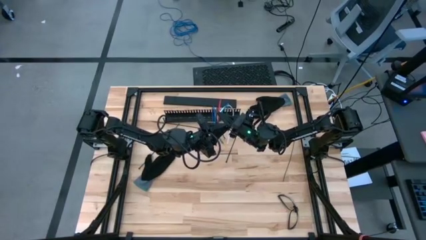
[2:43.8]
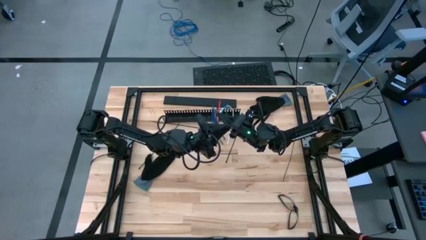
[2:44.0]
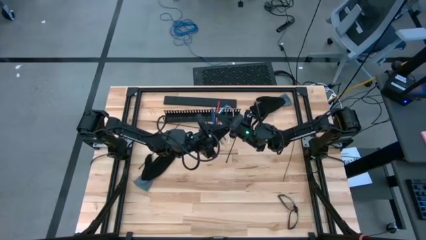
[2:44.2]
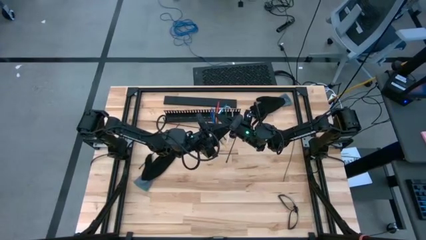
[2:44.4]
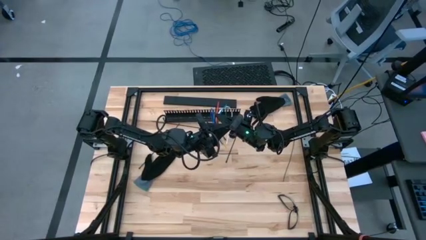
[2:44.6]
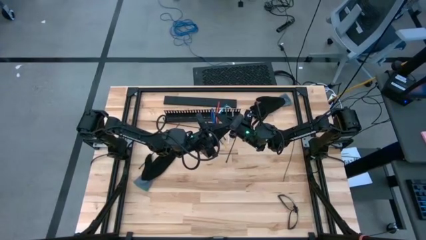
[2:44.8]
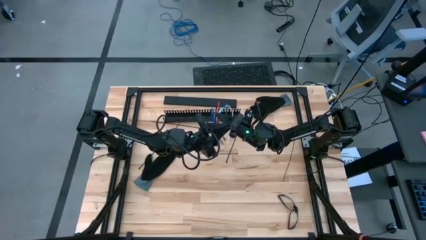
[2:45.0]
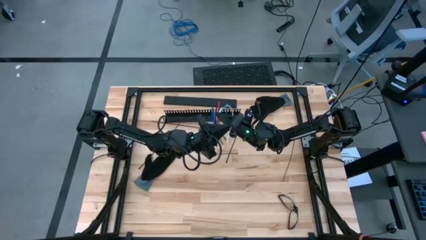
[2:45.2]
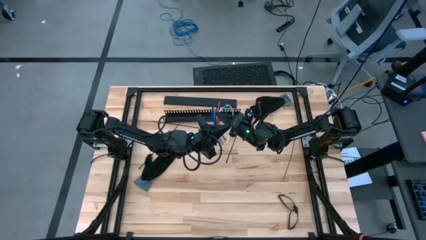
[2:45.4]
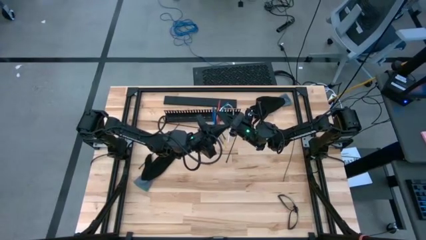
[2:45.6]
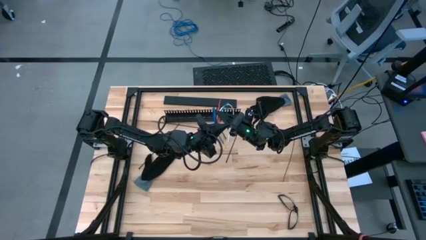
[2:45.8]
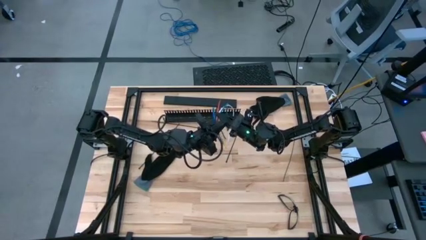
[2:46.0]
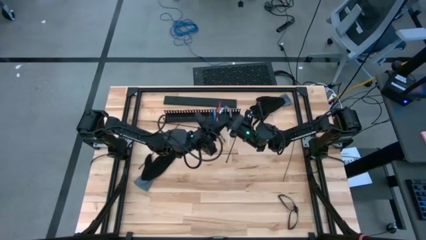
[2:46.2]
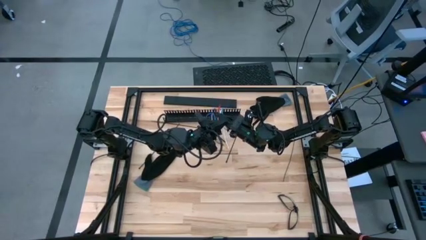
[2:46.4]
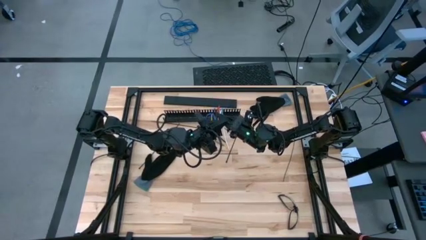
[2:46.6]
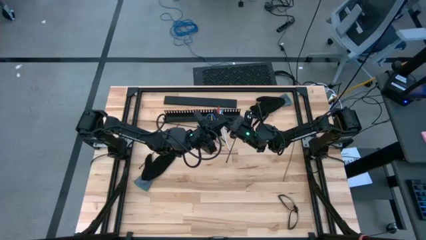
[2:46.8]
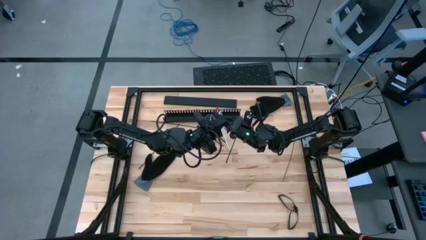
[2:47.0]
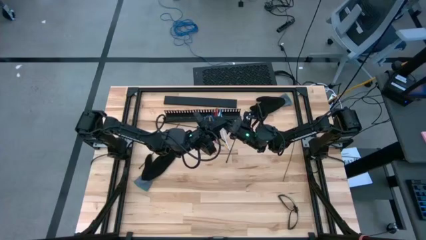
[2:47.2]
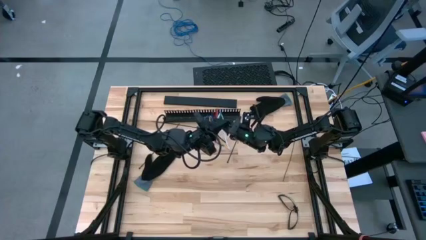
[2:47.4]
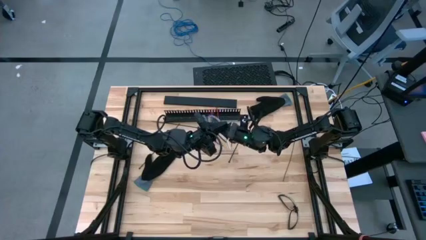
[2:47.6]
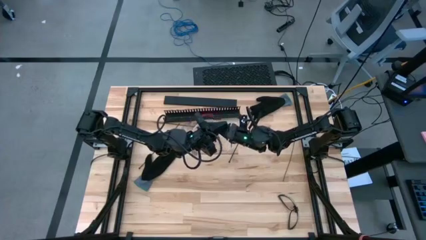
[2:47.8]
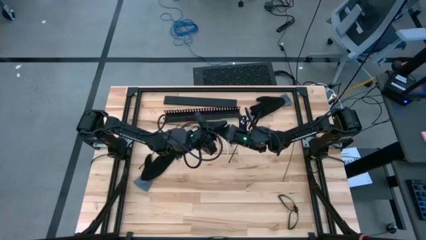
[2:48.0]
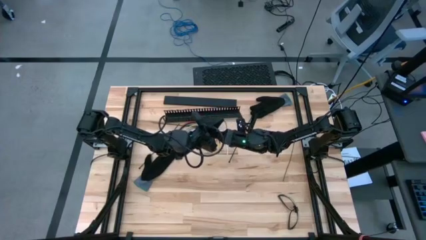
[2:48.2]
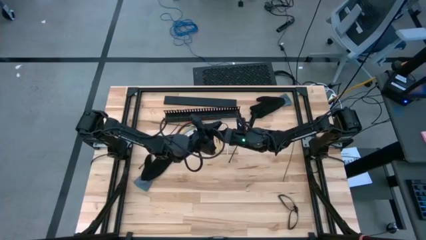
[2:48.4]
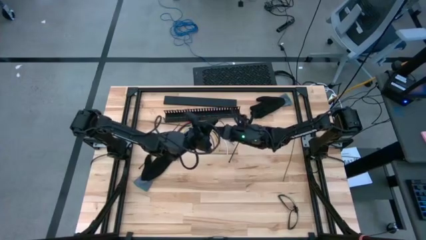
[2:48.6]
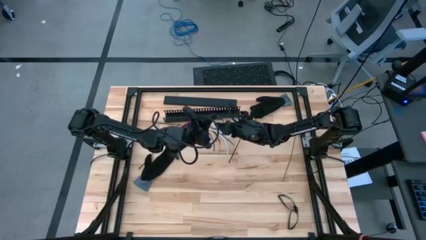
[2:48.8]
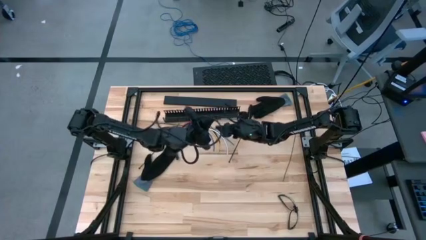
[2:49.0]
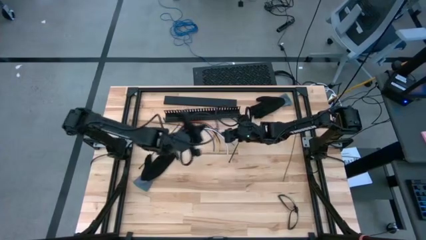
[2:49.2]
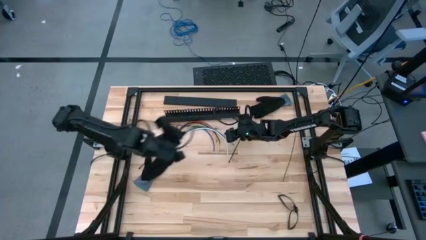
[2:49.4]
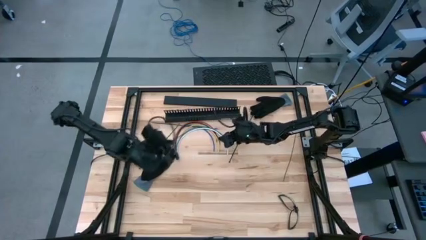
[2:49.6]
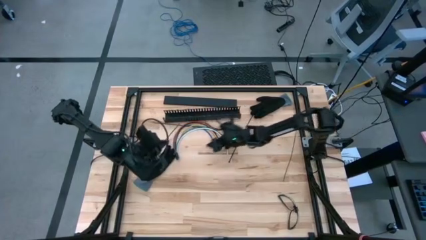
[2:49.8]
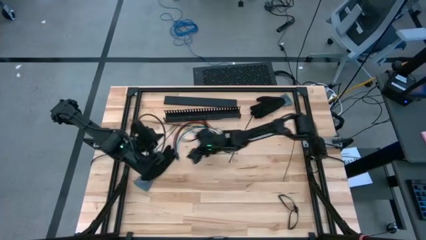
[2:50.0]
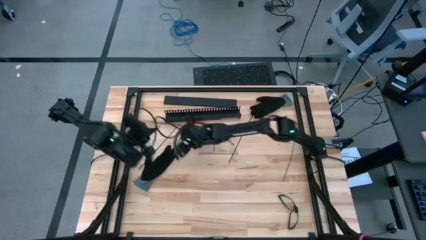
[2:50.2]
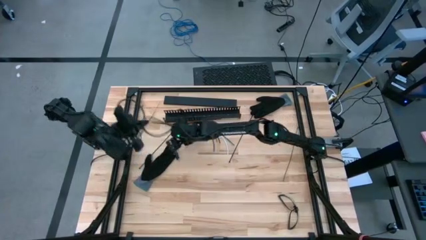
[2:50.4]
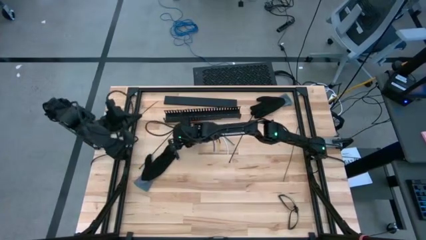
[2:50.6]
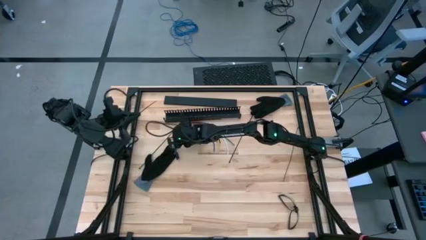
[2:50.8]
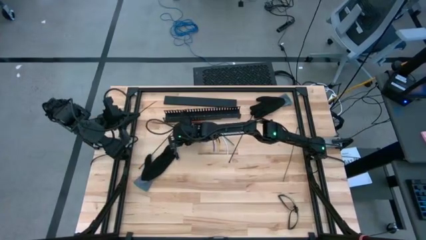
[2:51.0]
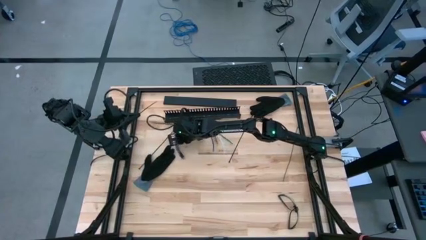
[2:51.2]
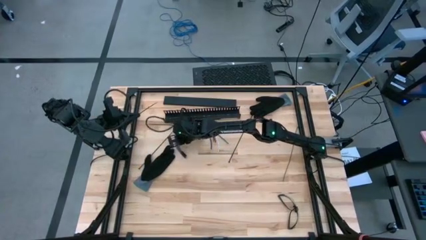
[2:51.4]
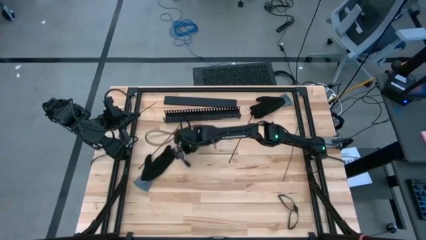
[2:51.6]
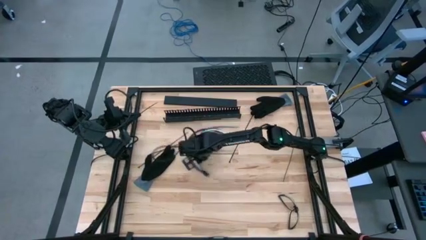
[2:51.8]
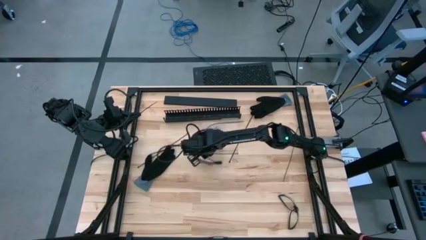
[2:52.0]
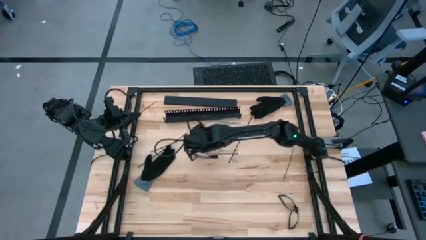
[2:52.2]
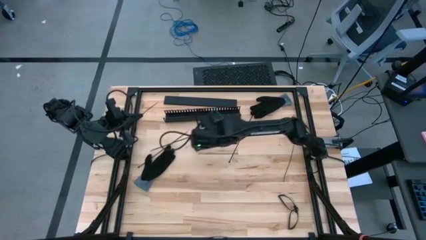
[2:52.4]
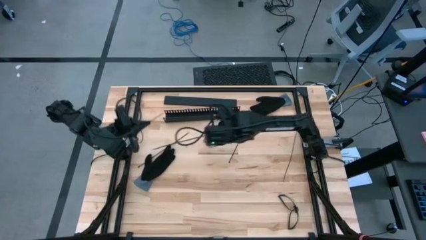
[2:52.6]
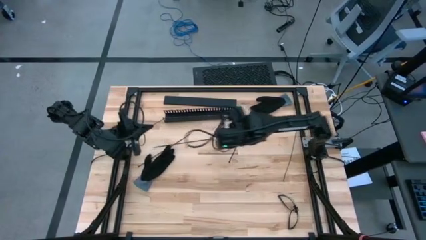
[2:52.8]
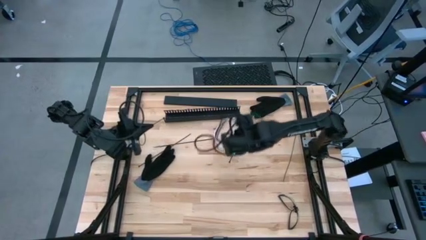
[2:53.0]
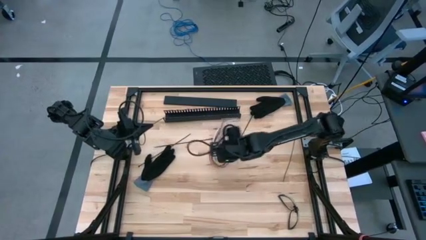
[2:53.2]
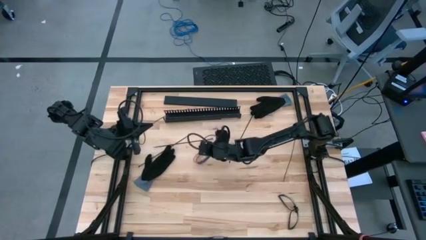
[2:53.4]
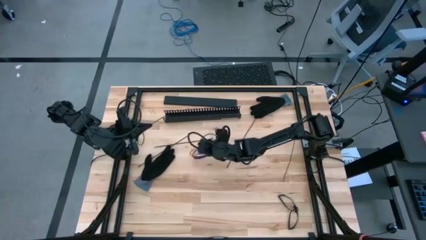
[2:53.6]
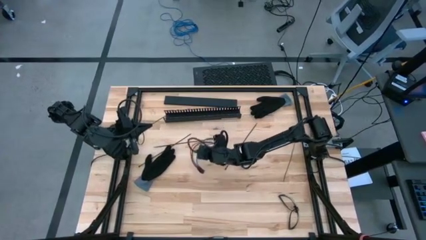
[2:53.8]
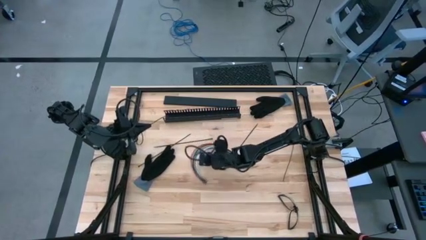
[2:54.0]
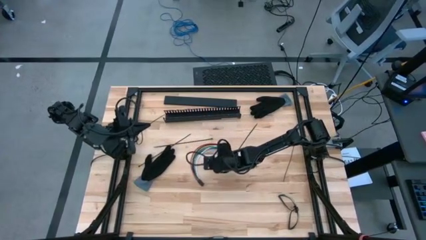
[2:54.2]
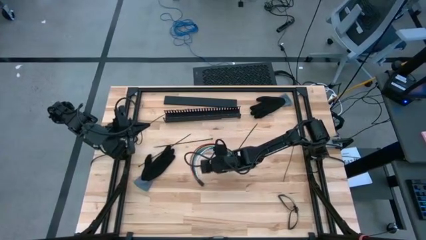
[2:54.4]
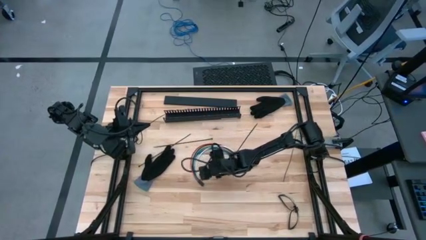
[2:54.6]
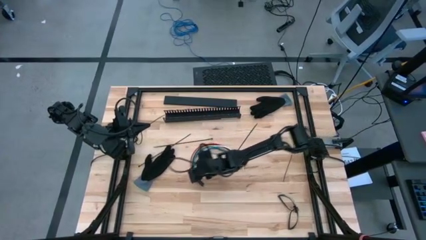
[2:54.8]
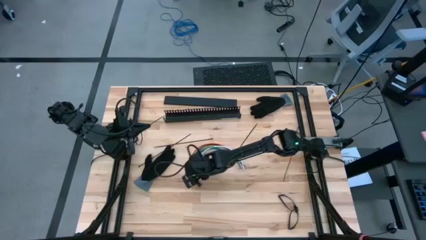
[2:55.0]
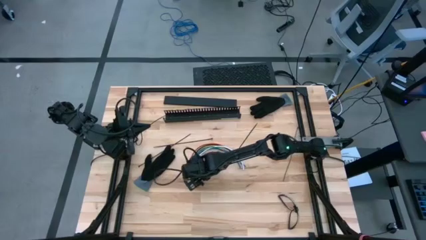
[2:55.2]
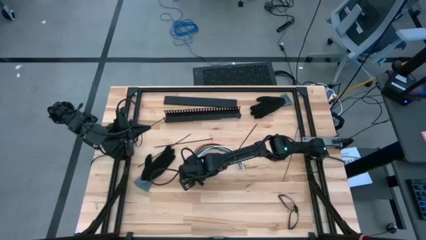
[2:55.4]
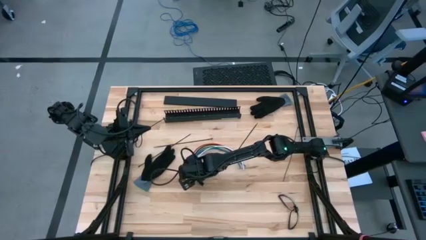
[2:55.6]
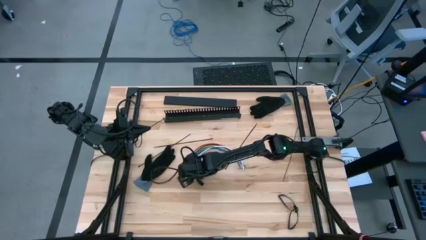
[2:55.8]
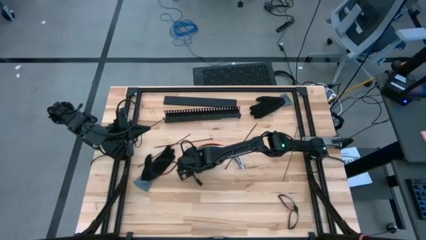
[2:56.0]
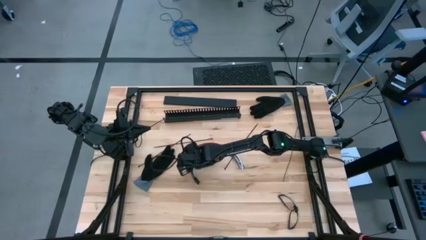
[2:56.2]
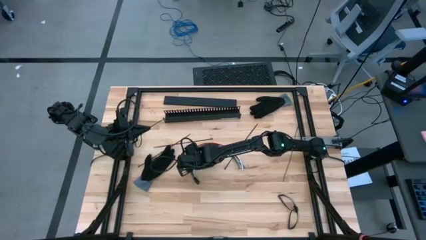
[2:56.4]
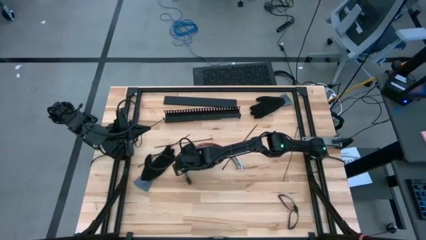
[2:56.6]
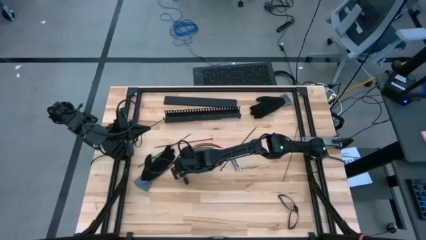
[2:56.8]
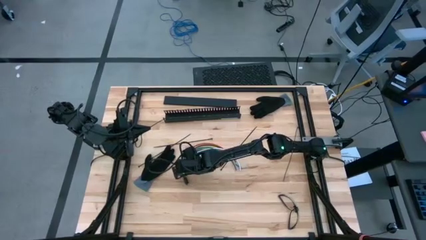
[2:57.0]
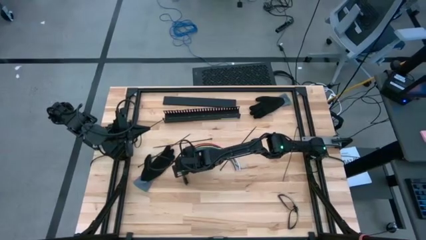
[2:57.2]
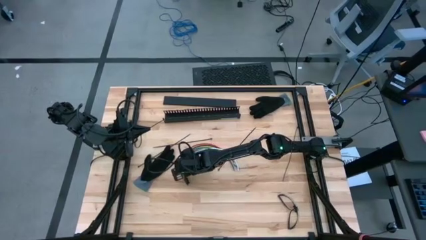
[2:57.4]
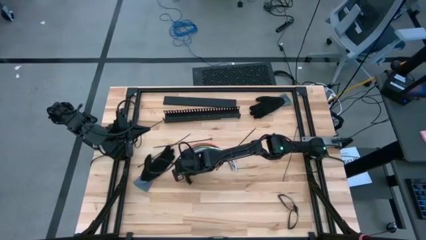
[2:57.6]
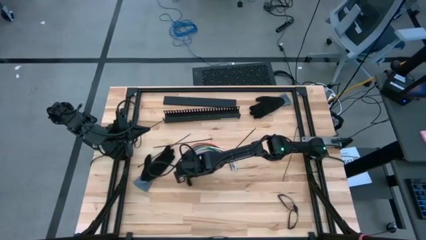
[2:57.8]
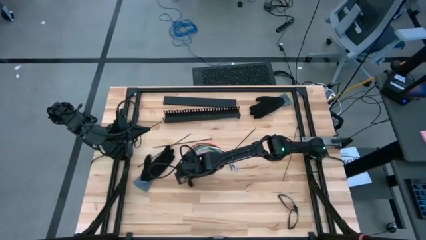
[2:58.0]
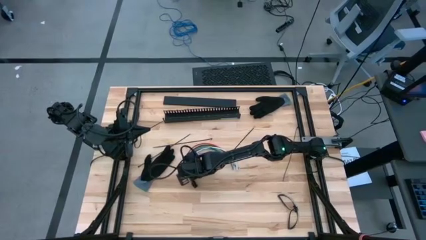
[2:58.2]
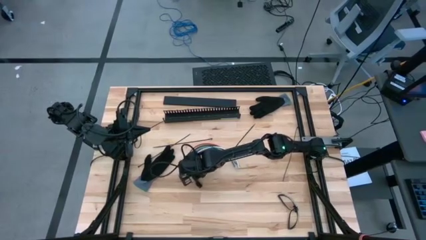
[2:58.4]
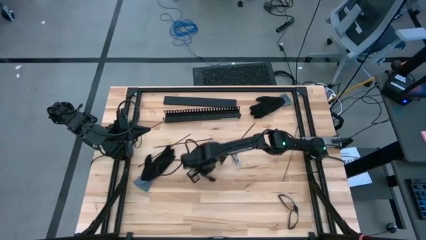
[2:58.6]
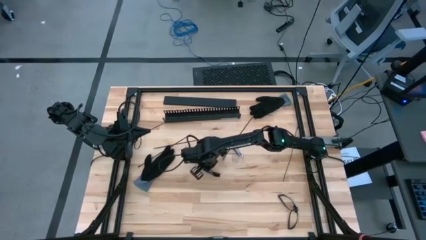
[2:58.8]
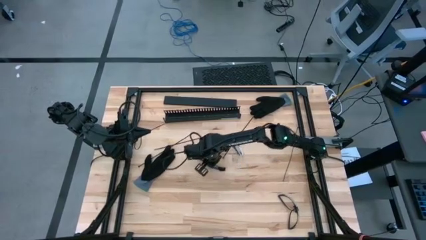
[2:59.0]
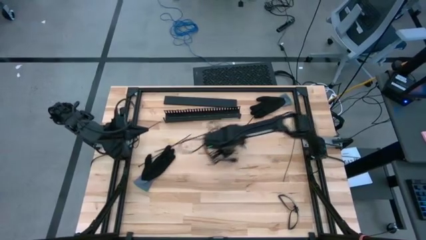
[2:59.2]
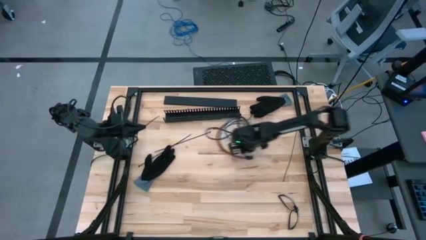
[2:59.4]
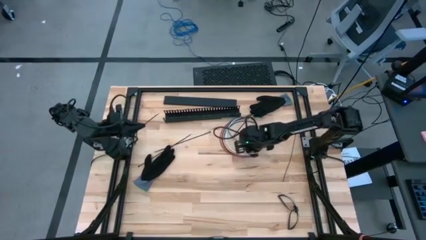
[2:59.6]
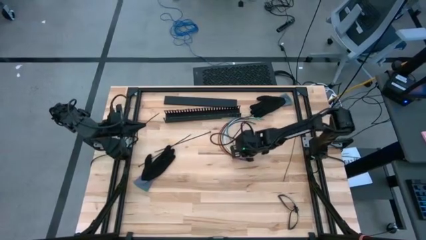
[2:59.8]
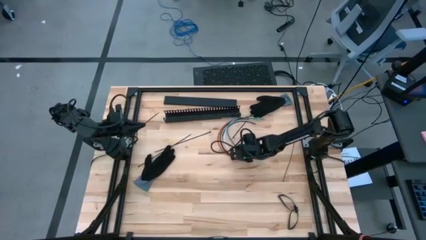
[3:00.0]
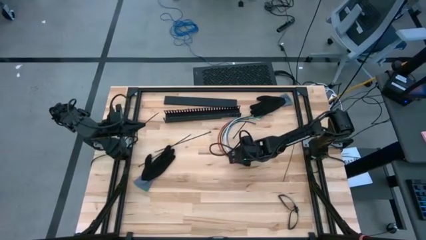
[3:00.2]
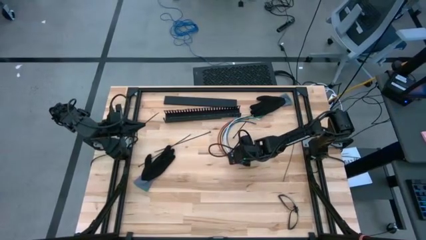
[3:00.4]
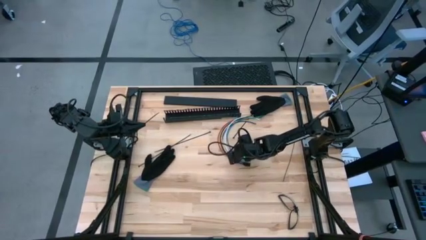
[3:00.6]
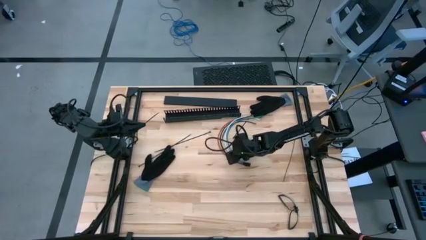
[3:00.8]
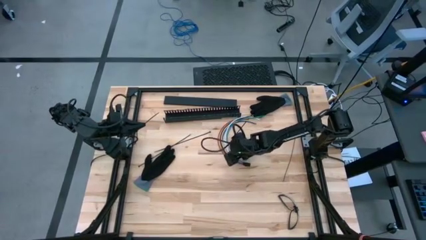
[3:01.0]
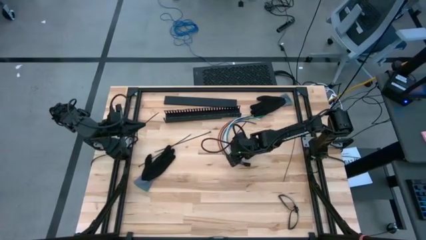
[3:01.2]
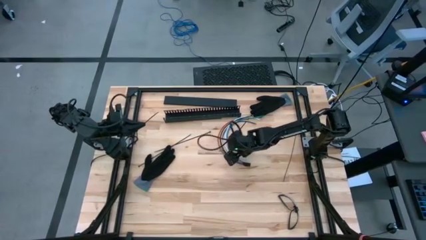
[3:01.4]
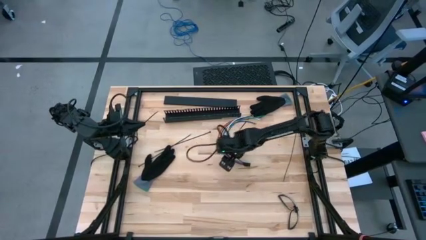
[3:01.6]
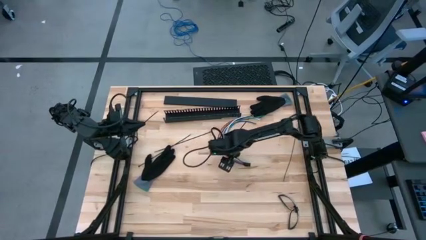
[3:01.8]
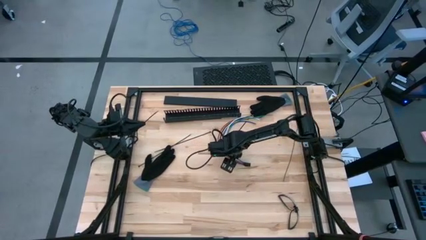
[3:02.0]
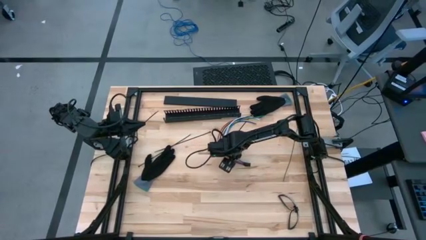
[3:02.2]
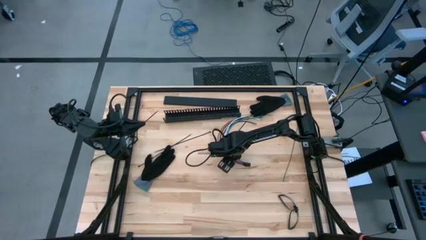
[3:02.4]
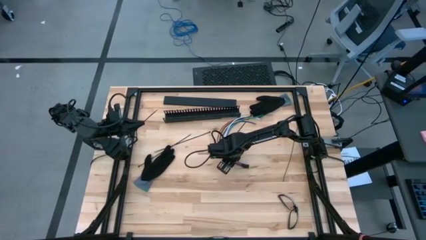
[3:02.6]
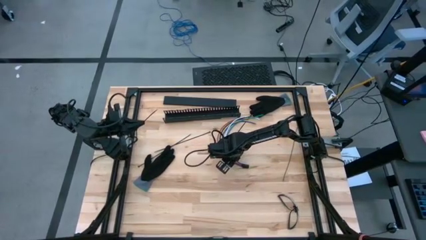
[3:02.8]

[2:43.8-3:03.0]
Task: Ziptie cables
Wrap the cable wires using a zip tie
